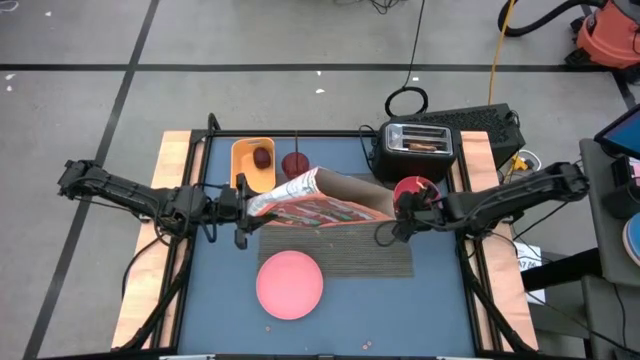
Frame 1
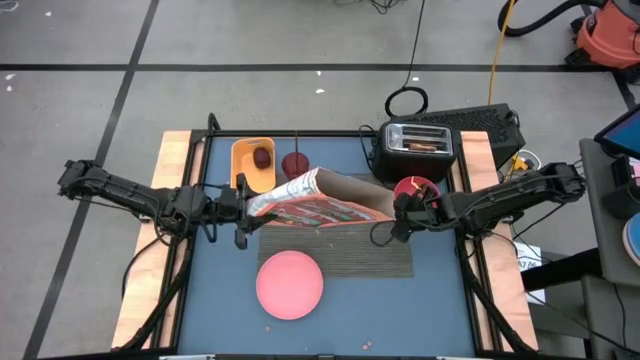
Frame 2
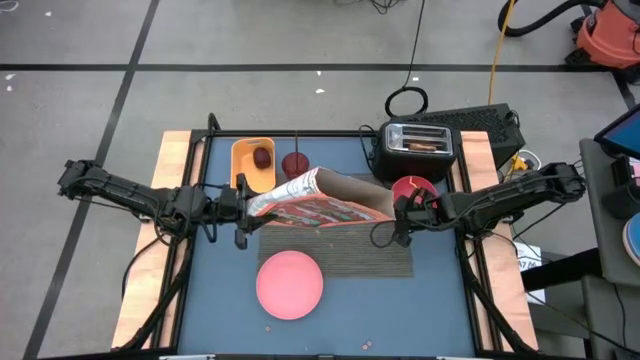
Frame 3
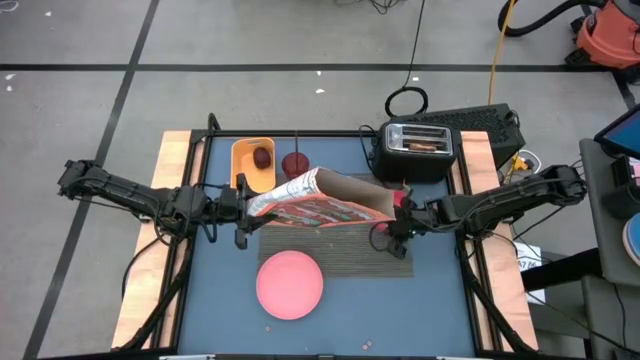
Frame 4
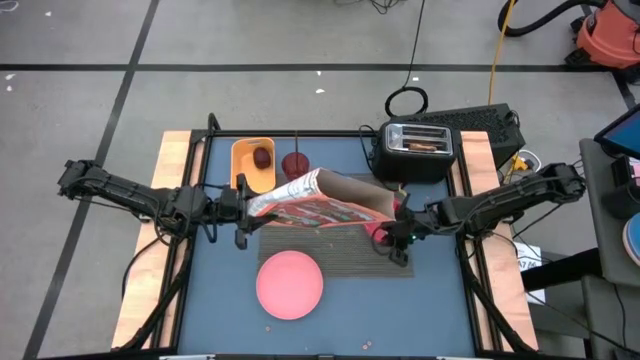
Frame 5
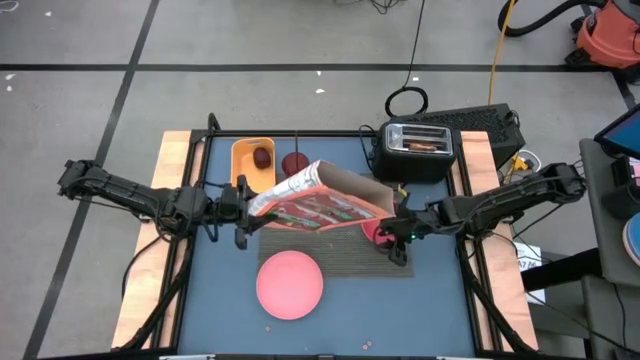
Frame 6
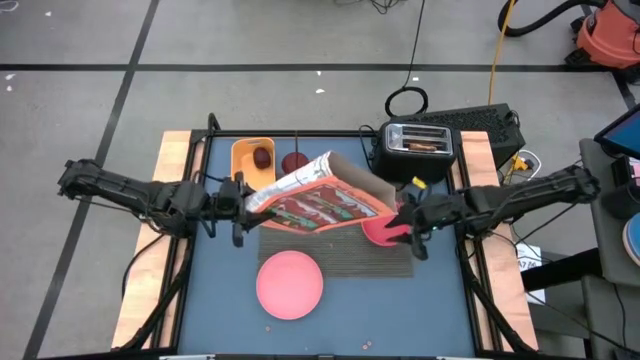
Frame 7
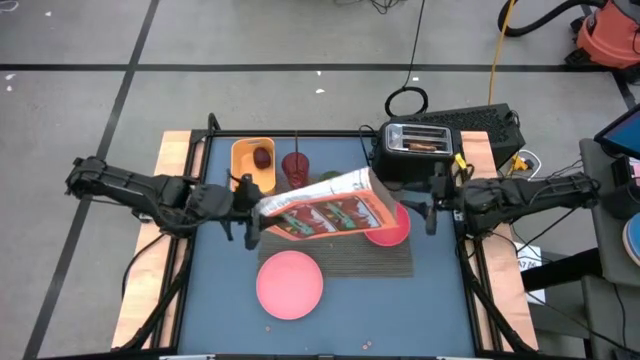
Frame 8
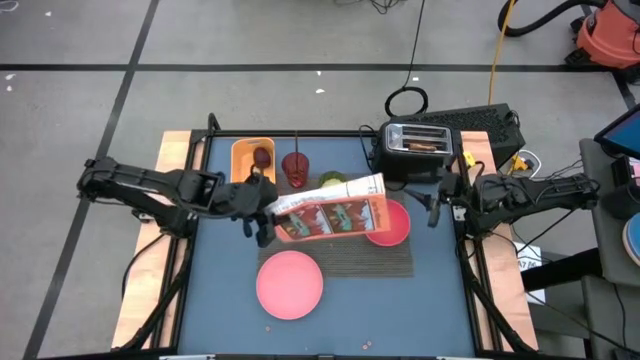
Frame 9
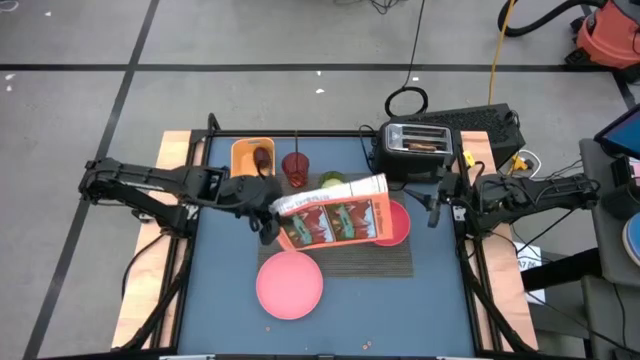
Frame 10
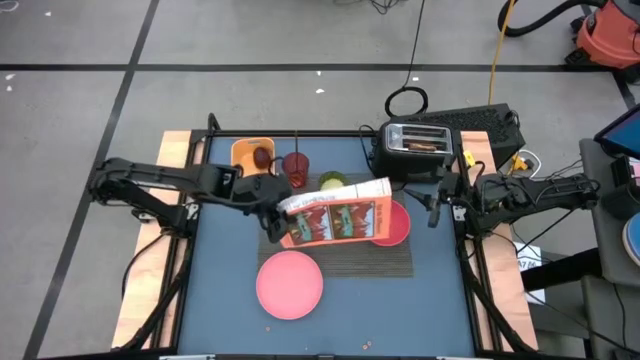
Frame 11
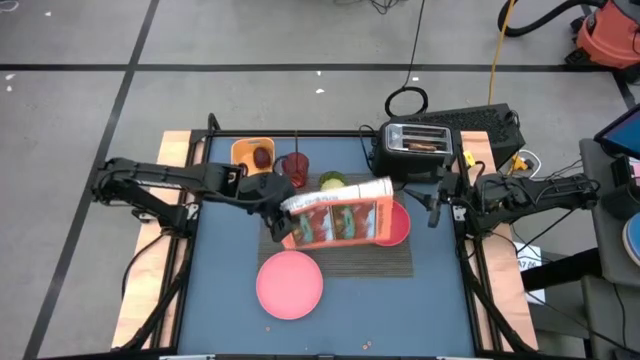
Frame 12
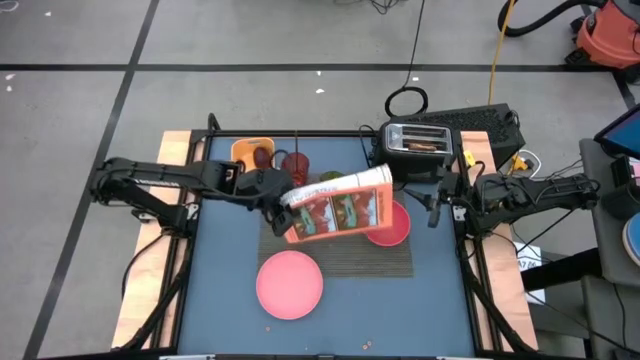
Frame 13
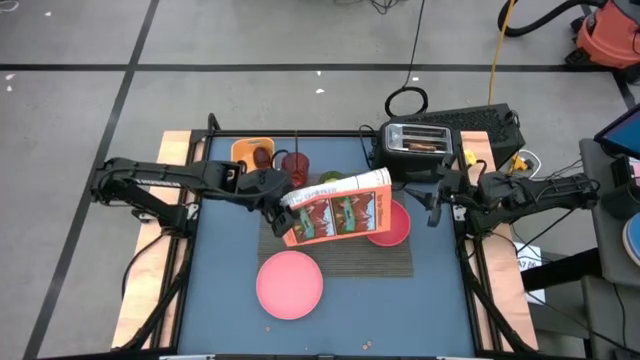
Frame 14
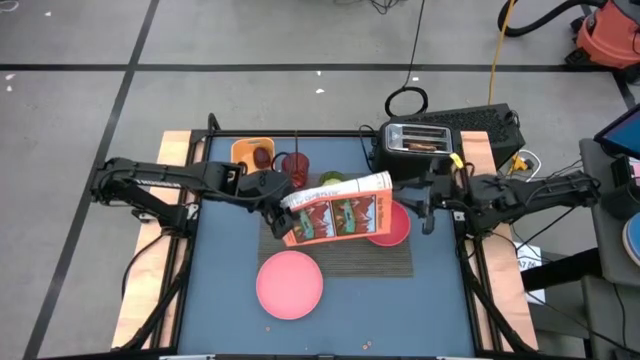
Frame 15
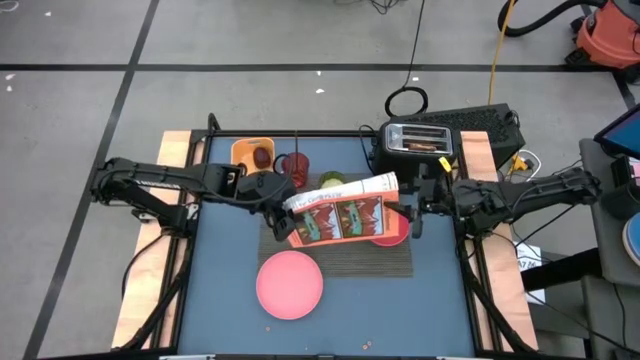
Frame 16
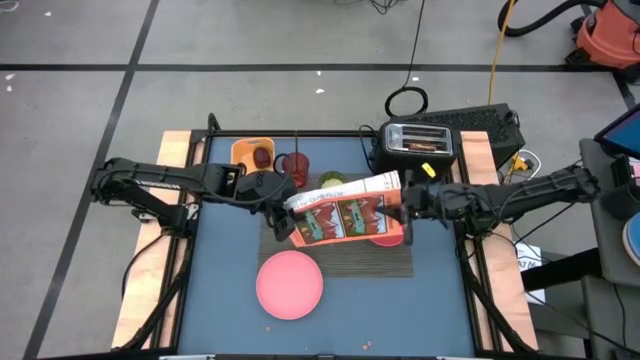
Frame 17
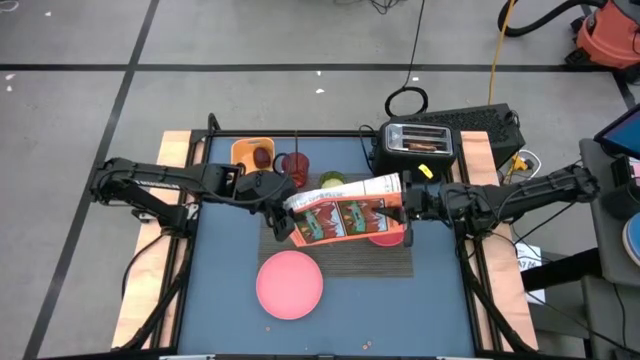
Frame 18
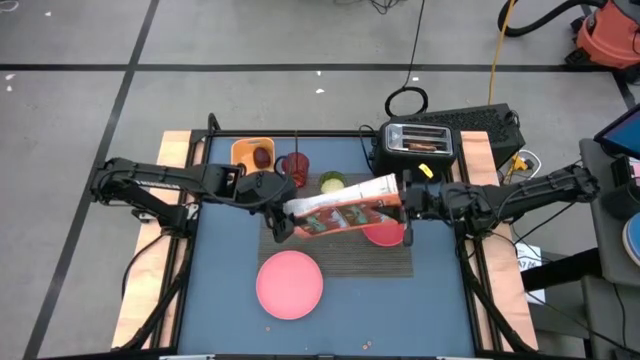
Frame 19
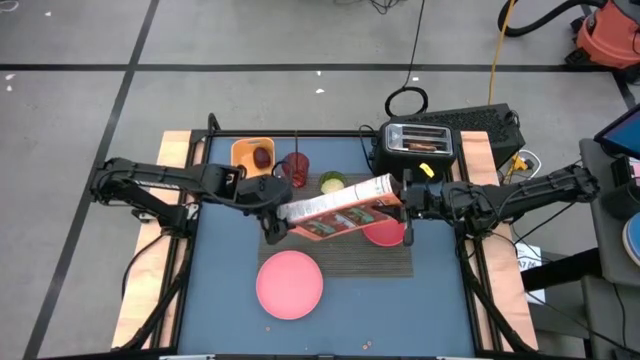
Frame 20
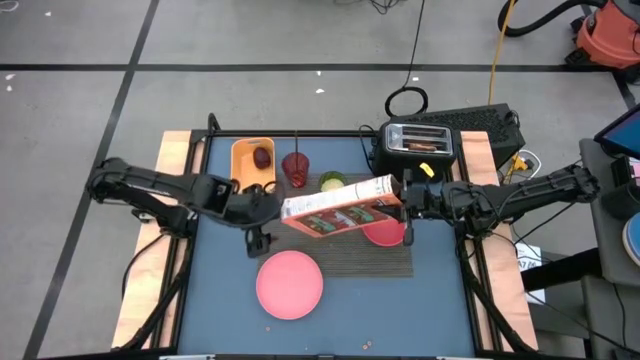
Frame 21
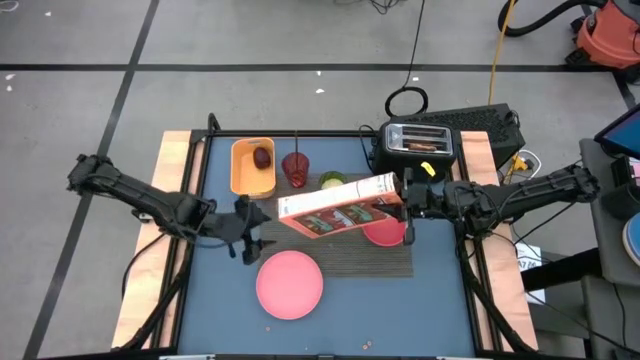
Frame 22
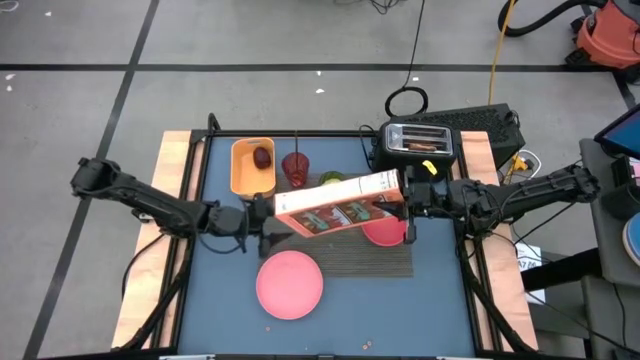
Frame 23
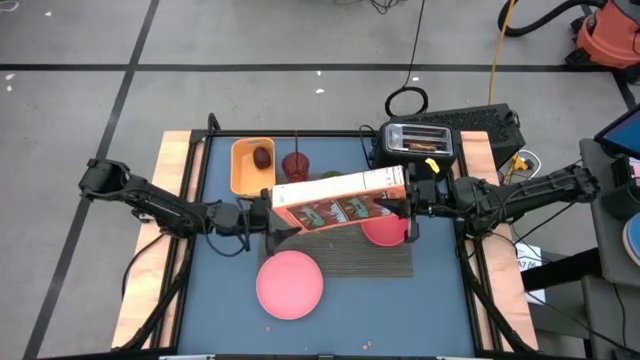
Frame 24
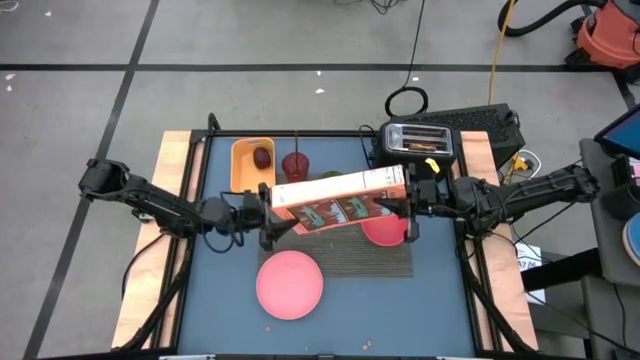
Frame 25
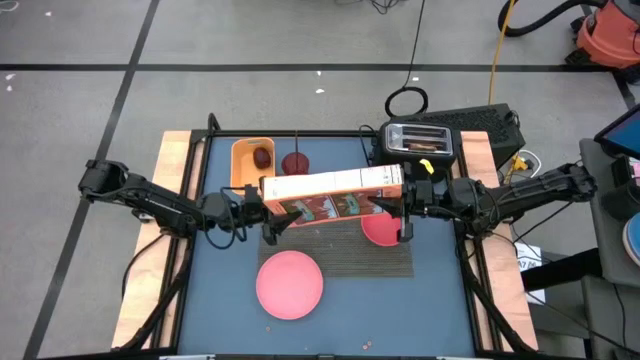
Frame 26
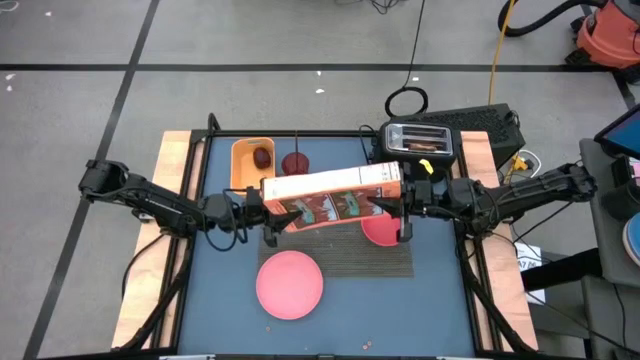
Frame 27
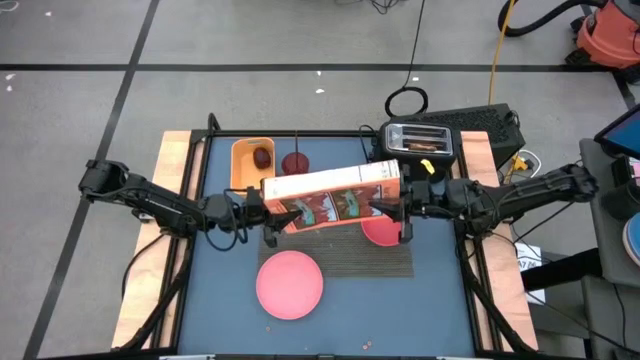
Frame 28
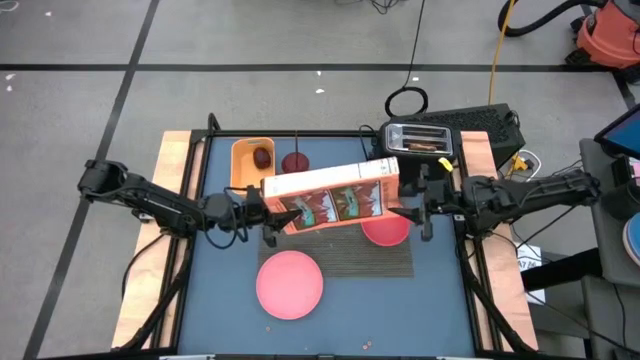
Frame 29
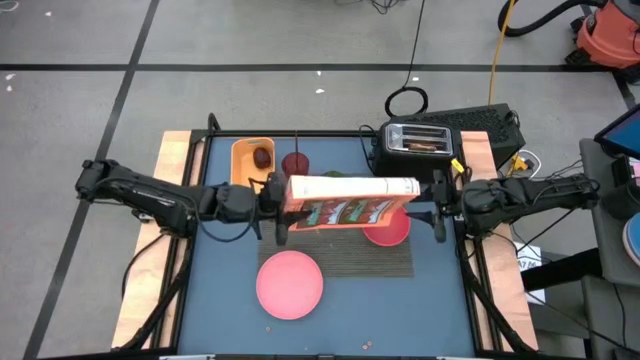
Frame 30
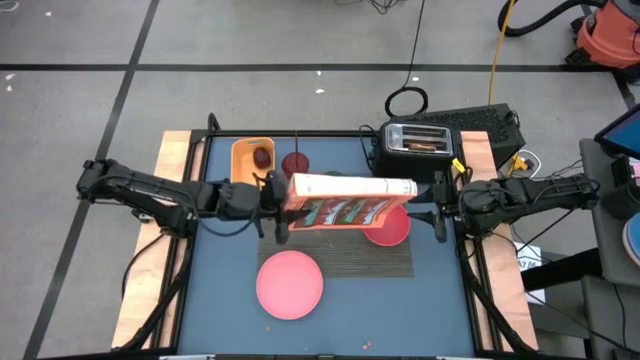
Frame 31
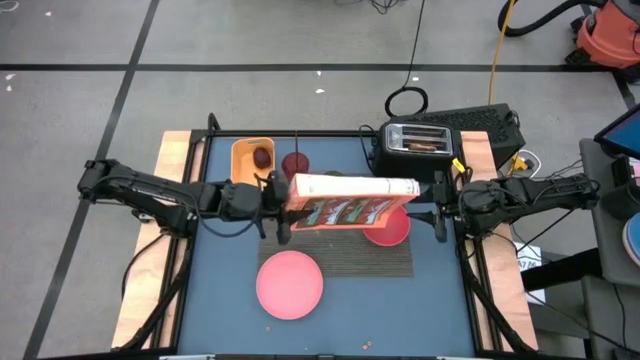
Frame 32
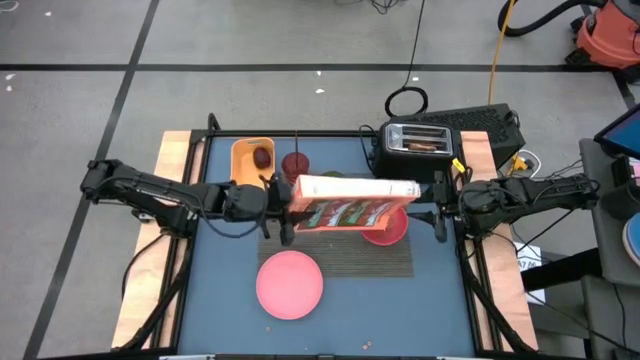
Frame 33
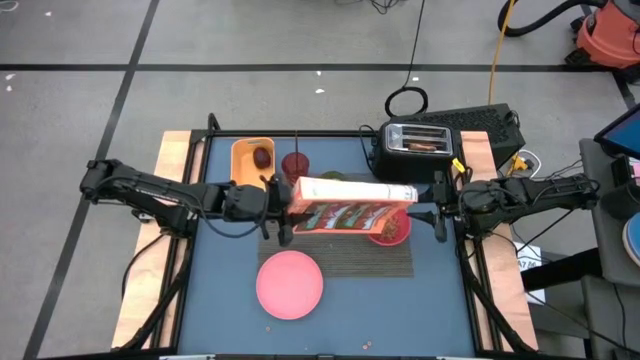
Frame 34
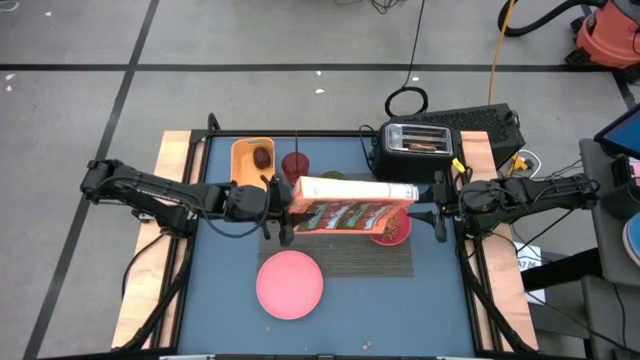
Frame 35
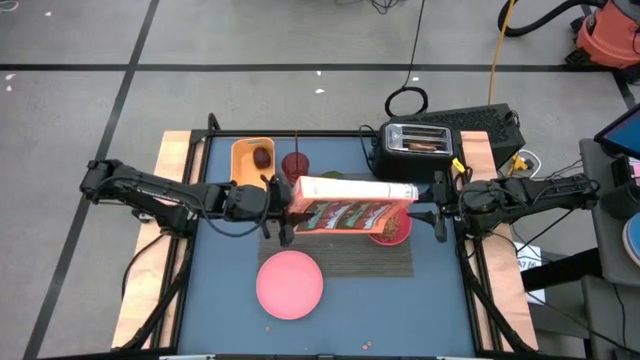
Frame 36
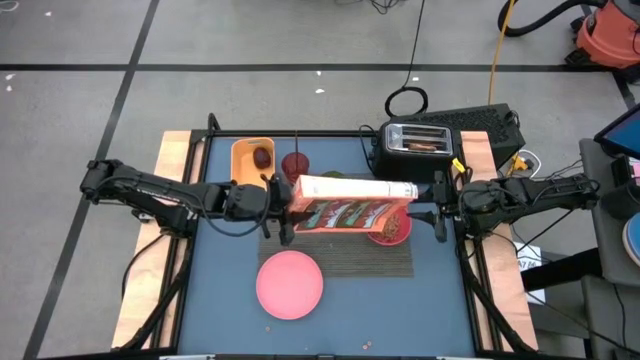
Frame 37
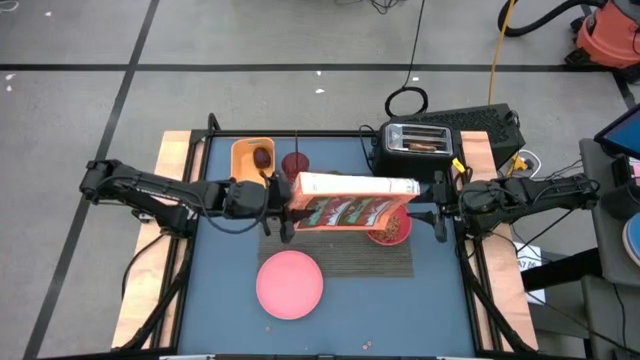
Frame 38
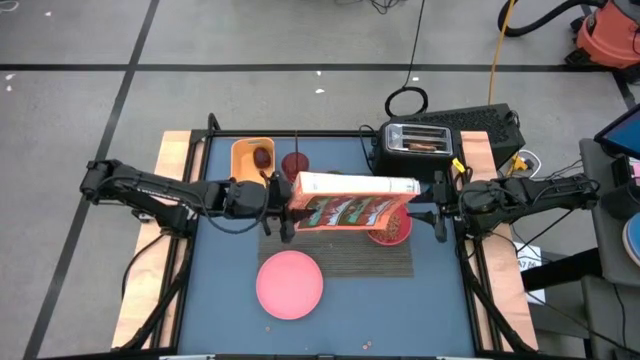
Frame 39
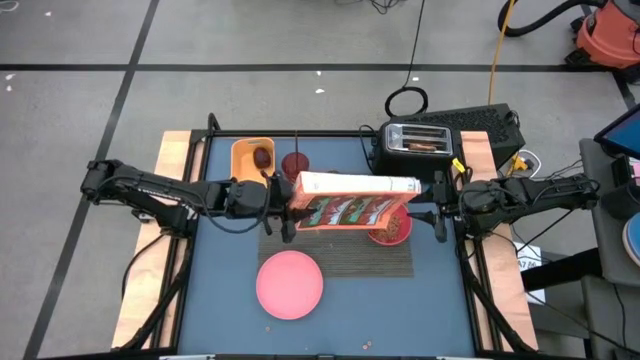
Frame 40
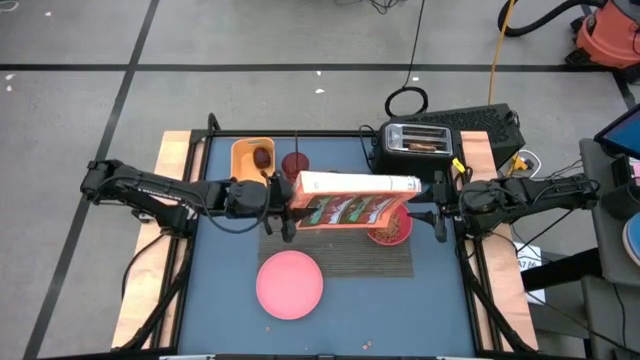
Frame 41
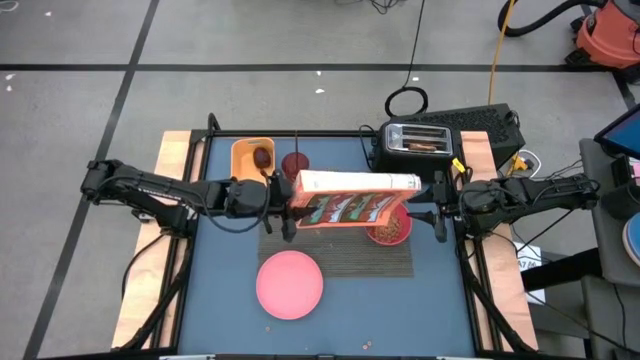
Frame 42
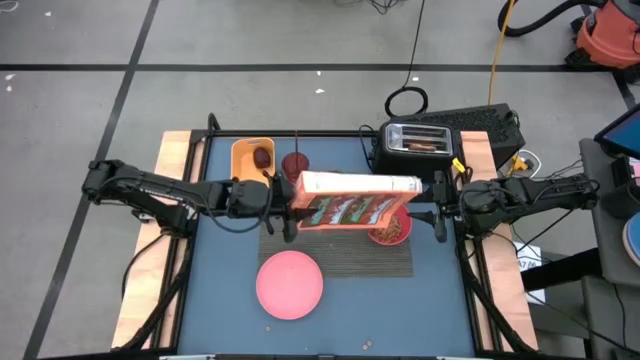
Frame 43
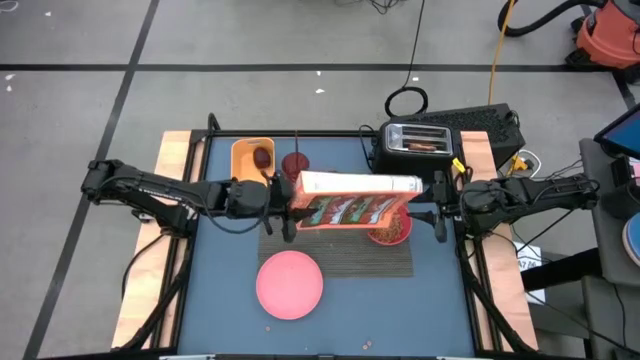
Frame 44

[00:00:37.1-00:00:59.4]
Task: Arrange a breakfast setting
Pour the cereal from the cereal box into the pink bowl
